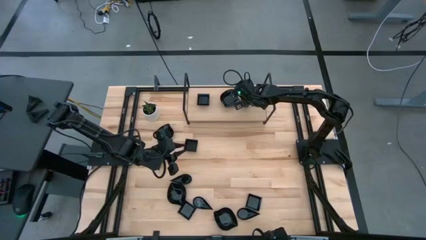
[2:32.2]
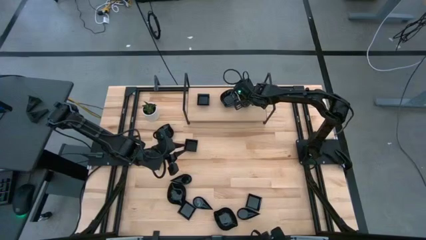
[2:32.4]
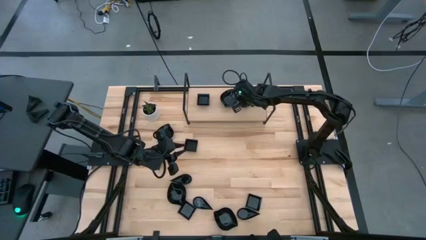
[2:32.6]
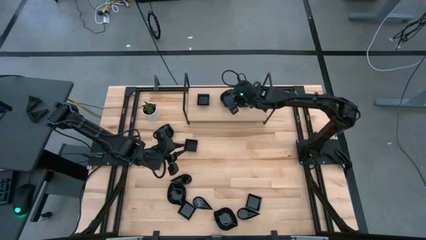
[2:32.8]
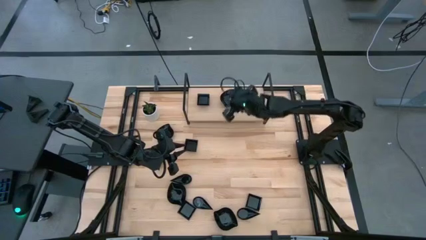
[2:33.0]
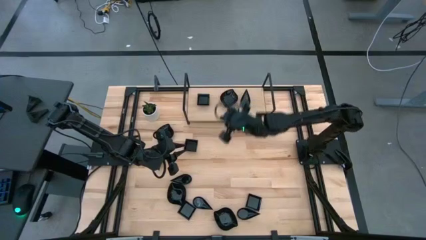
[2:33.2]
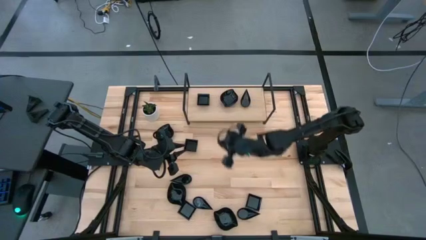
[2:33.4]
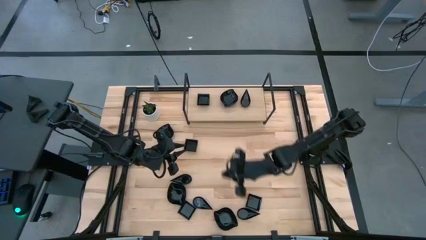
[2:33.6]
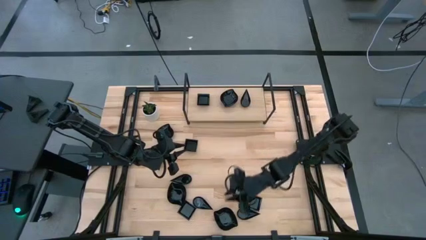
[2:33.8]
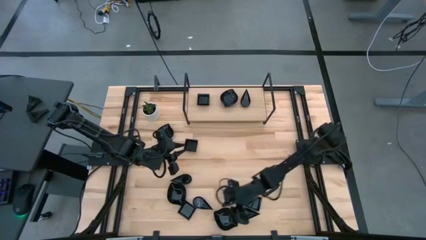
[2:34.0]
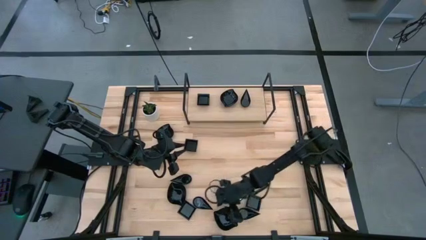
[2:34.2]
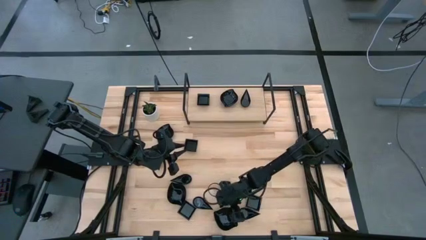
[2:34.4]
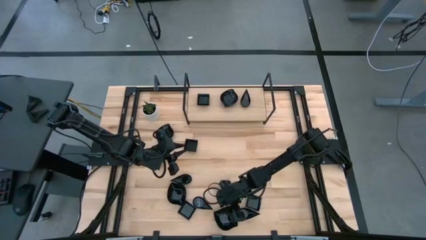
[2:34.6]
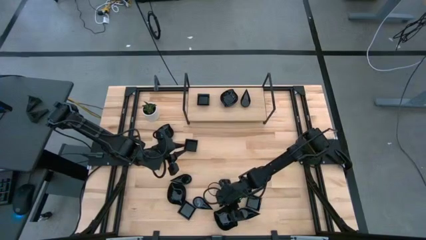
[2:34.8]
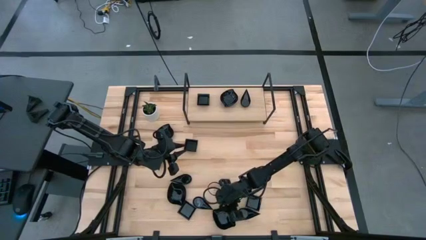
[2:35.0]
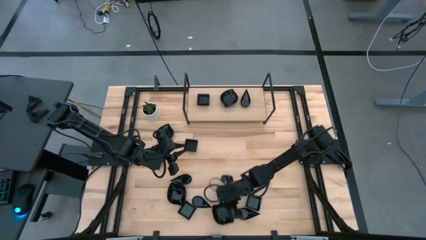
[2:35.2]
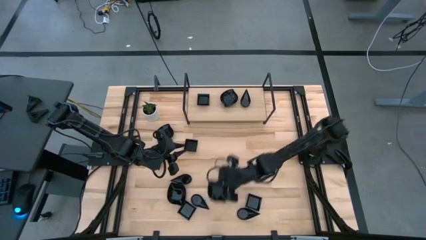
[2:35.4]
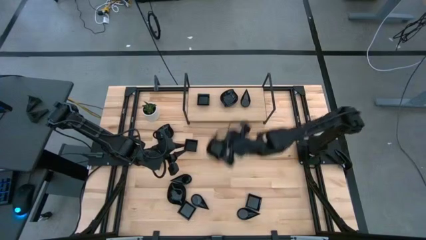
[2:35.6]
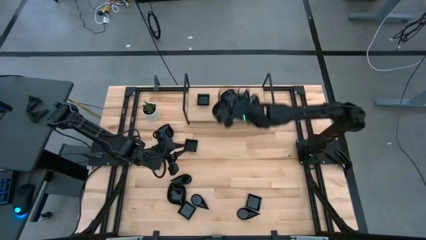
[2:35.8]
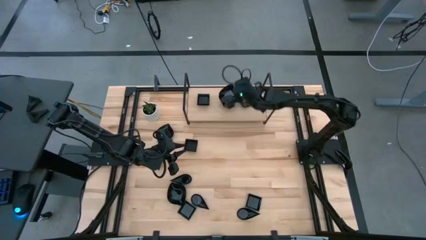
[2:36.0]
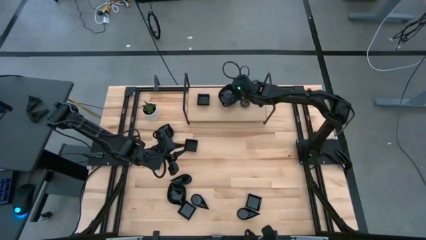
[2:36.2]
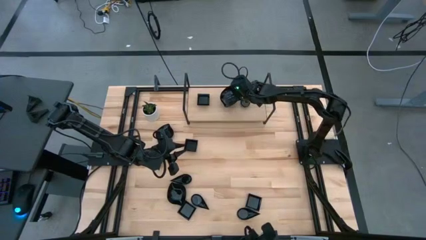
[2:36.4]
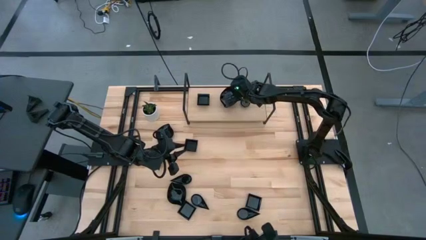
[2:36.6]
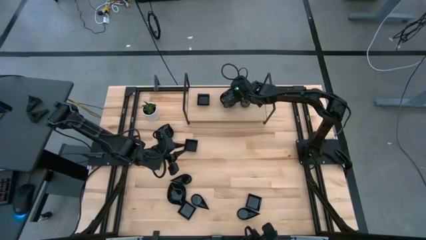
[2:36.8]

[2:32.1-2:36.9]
Task: Pick & Place Mini shaped plates
Stack the black leaf shaped bowl on top of the other black leaf shaped bowl on the shelf

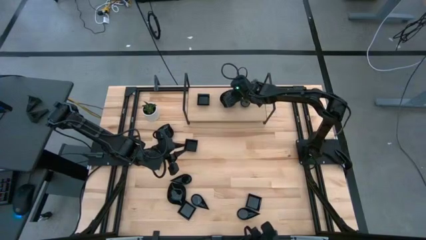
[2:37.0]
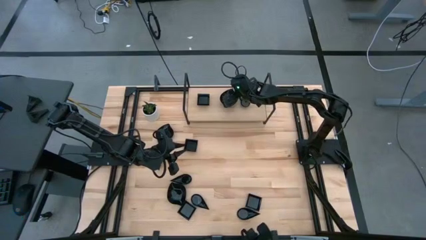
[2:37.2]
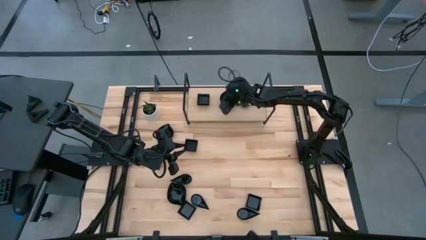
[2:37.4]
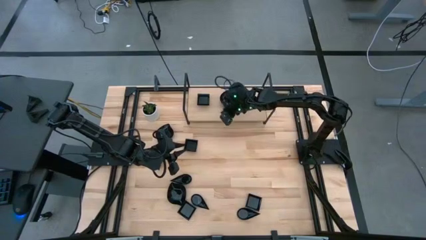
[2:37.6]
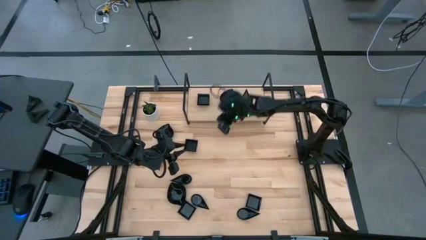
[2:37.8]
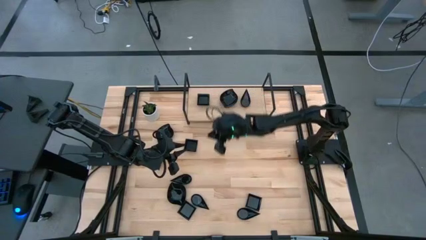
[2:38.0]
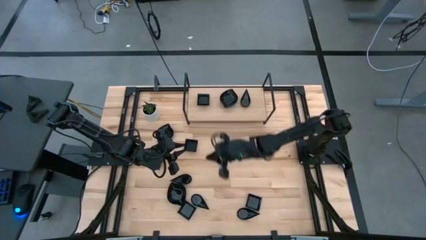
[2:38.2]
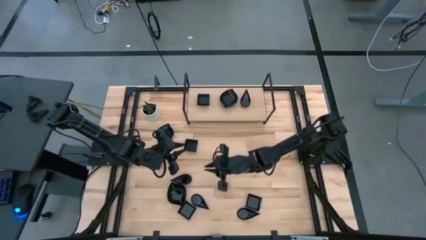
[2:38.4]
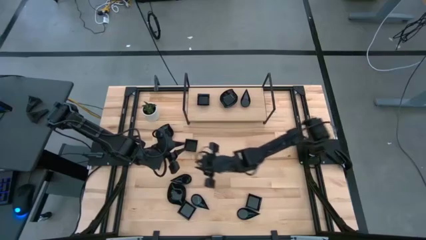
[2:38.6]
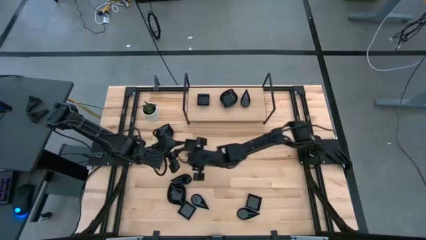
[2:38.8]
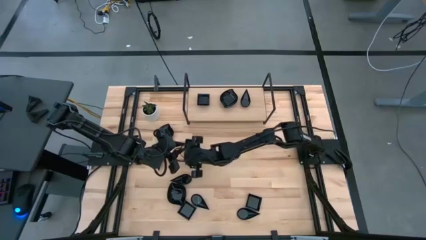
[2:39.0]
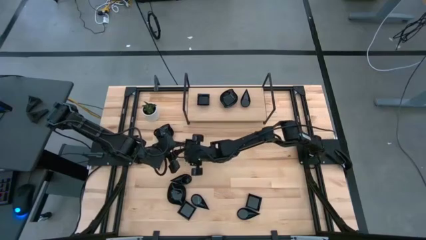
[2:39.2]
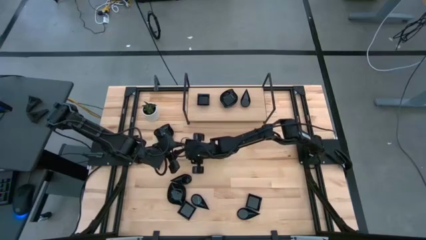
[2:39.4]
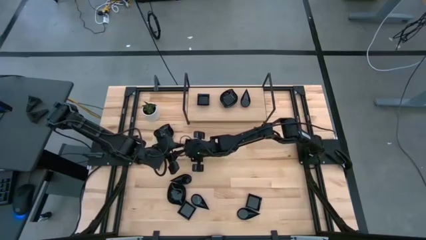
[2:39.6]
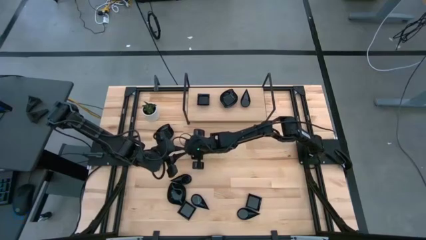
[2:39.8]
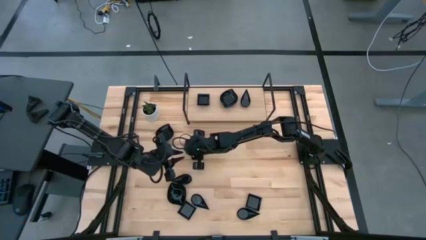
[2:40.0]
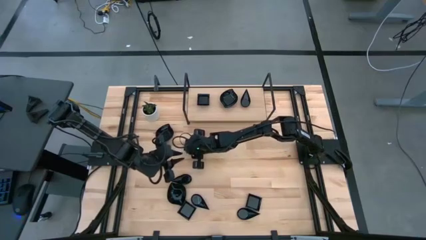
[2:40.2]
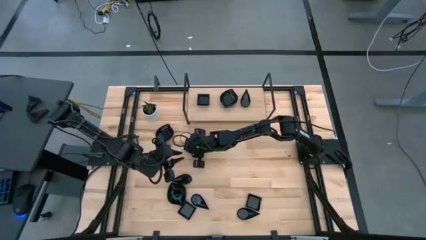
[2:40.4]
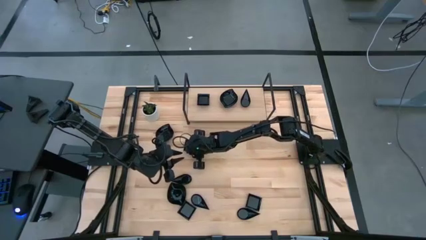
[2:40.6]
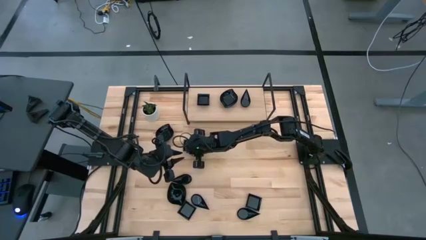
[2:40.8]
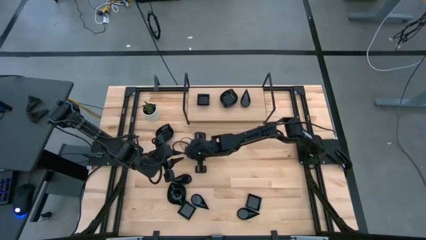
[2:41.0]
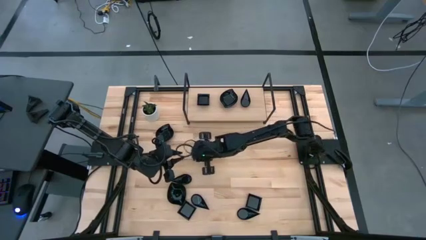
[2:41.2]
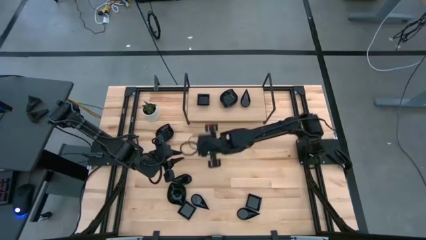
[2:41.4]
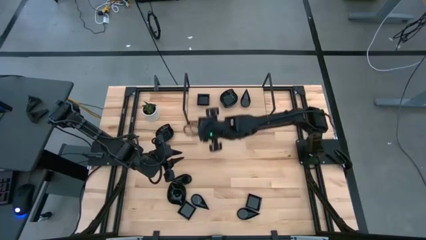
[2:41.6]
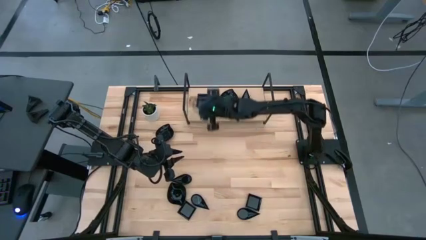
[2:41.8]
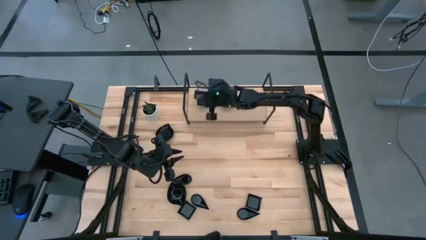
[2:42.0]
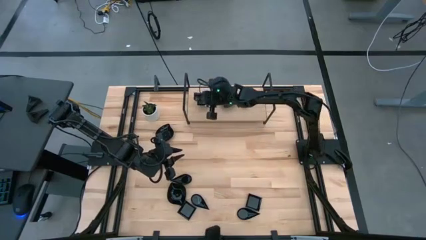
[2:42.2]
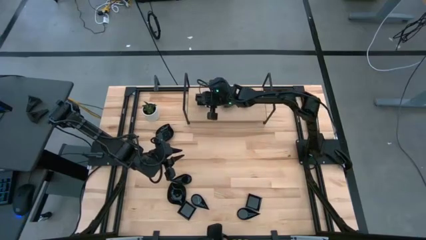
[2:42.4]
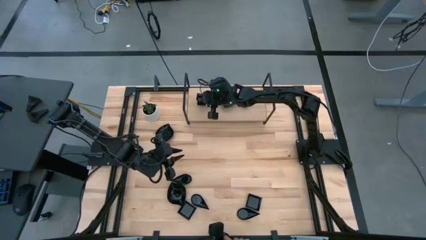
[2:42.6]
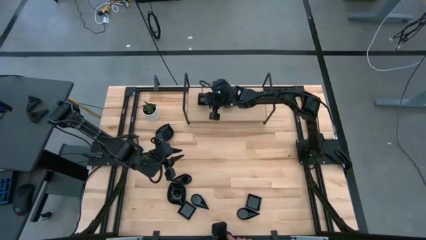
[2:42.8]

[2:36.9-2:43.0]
Stack the black square bowl on top of the other black square bowl on the shelf

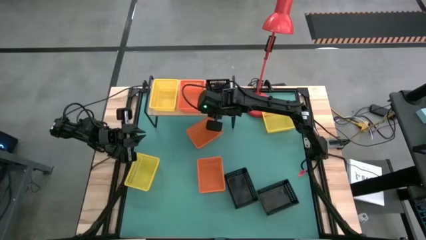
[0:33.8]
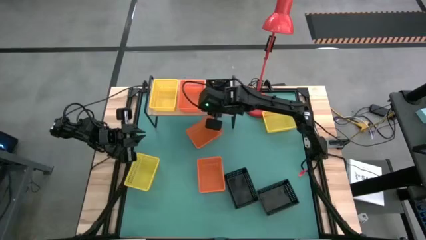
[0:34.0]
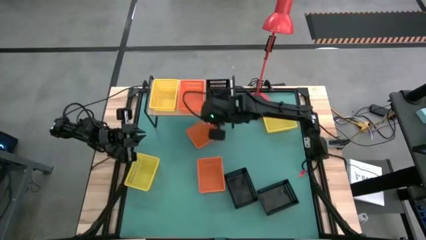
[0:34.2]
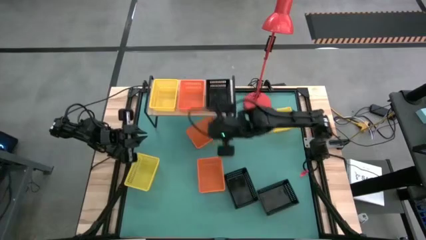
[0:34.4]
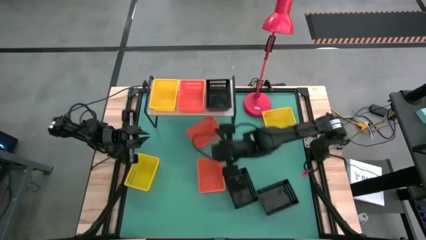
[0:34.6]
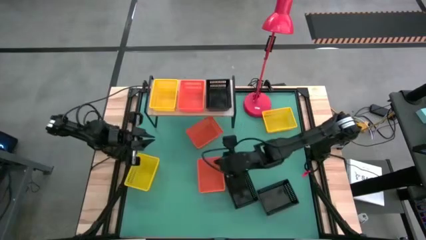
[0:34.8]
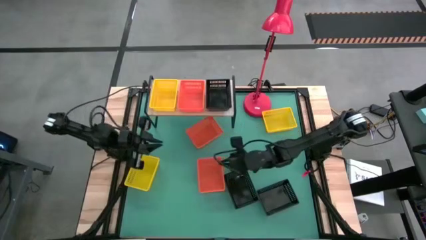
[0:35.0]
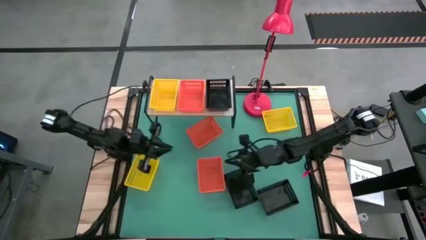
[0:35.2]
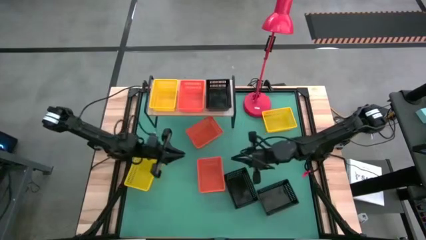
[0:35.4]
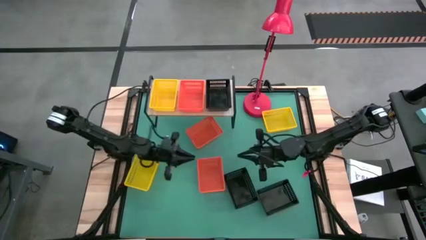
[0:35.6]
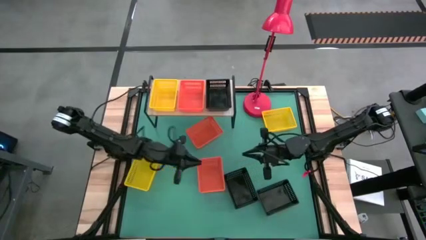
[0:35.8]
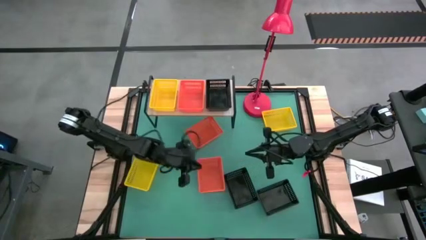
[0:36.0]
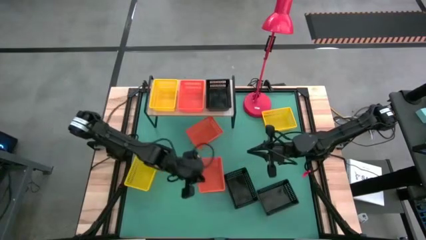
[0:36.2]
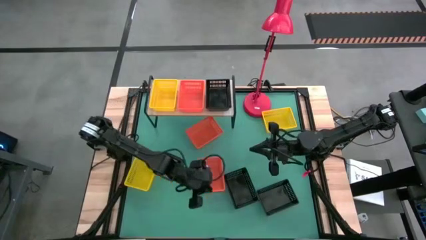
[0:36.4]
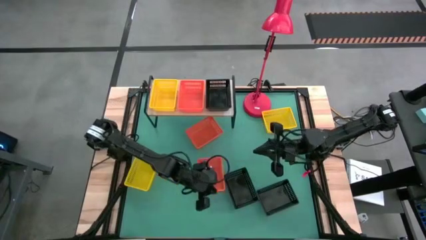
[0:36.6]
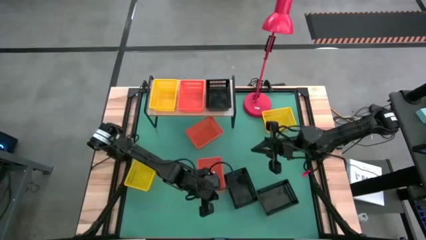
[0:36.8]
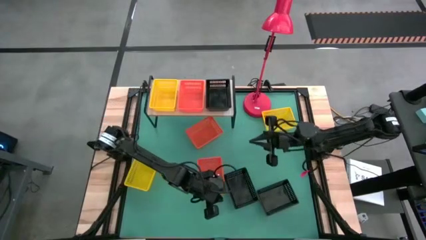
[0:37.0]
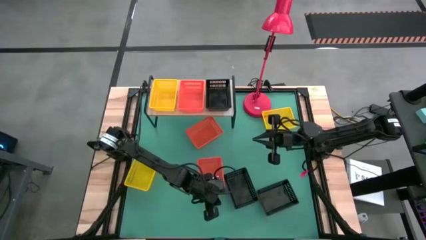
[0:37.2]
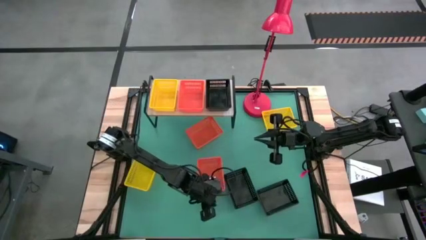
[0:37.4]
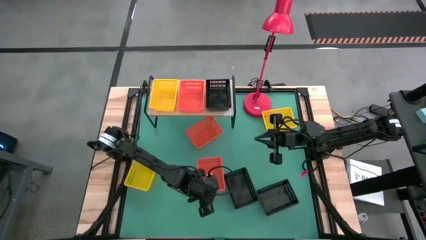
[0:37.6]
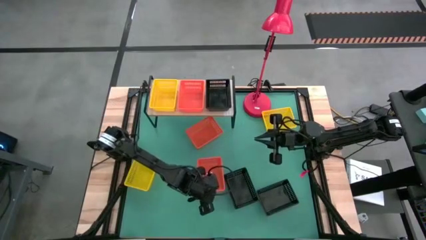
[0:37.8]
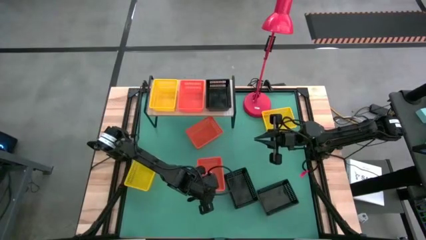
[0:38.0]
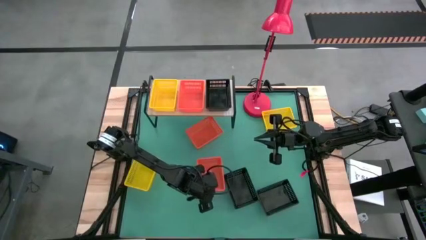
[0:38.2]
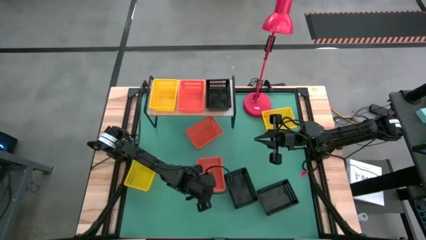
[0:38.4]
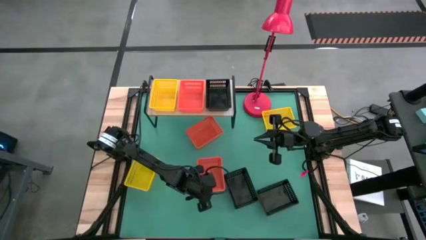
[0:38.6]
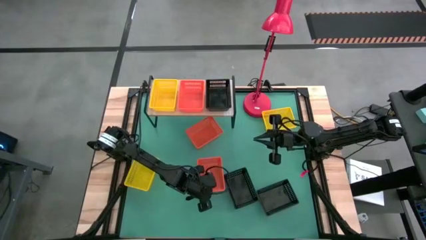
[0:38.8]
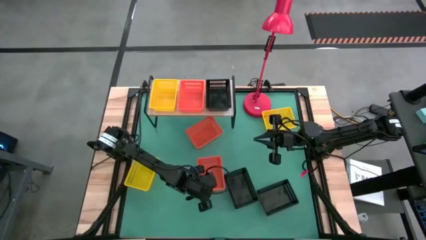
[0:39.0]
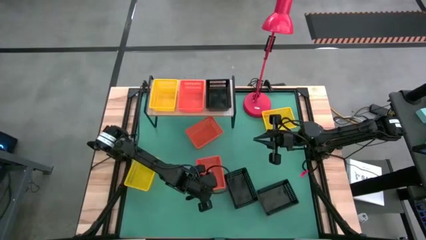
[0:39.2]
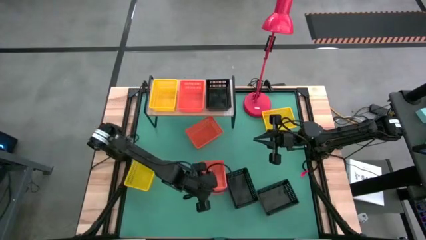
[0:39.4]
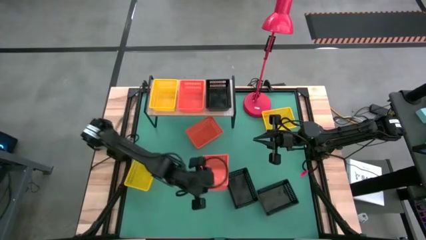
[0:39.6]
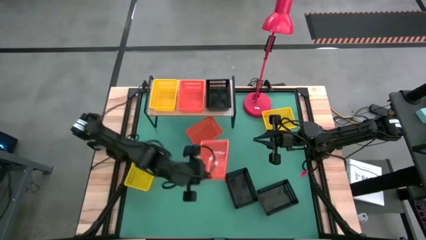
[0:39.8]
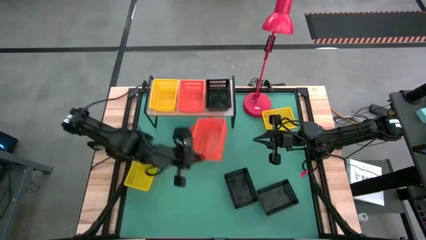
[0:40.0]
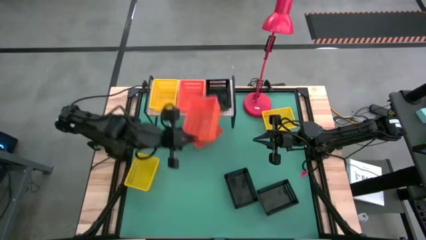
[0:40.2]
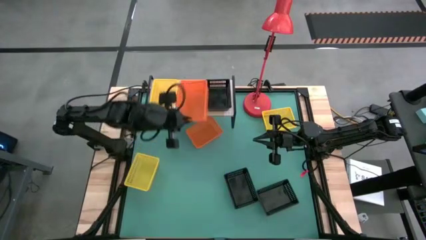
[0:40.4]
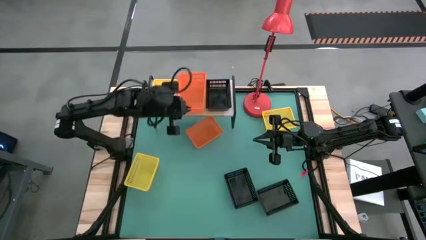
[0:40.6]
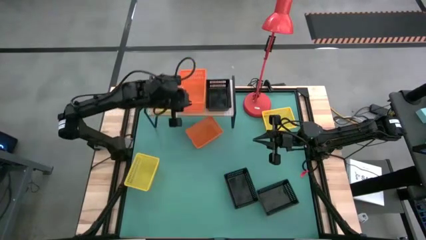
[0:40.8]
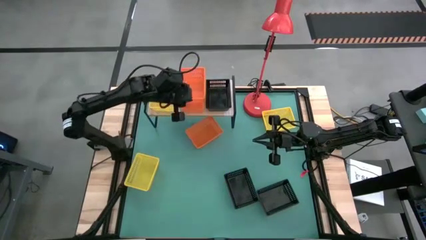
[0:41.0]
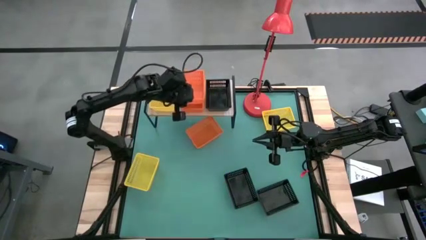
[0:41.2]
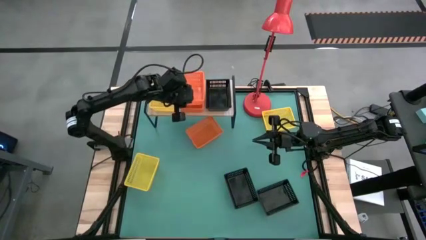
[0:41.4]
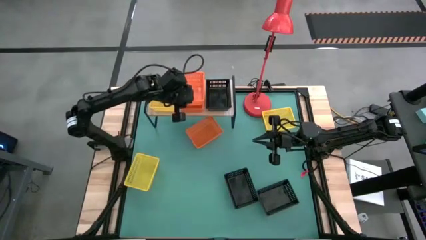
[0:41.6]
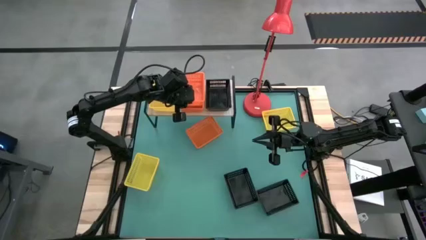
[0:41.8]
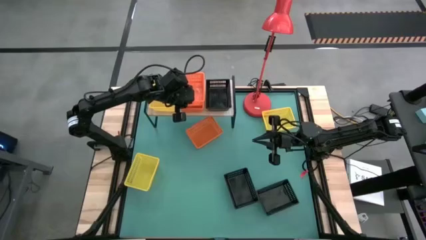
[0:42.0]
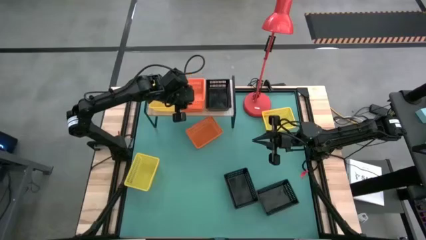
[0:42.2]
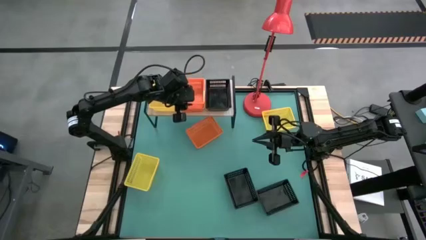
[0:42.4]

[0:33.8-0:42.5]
Task: Stack baskets on shelf by color
Stack the bottom orange bin on top of the orange bin on the shelf
